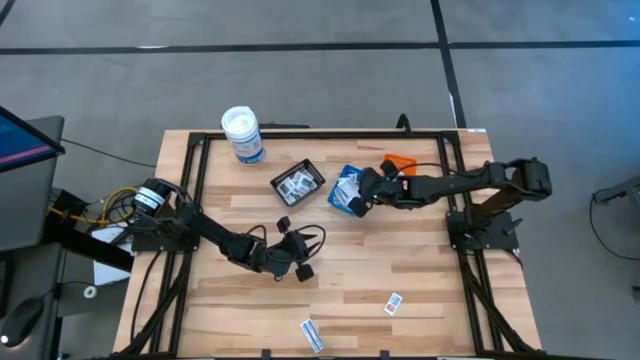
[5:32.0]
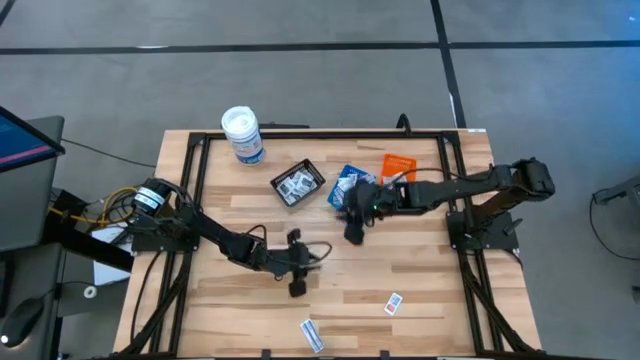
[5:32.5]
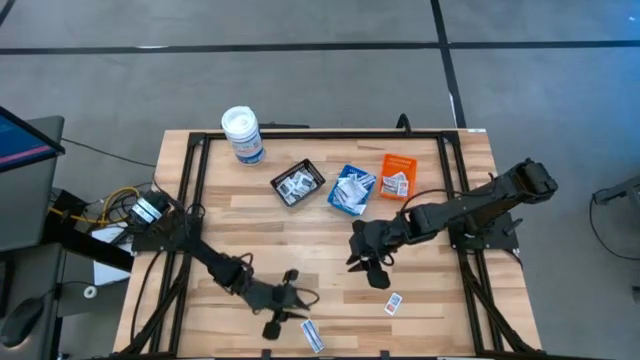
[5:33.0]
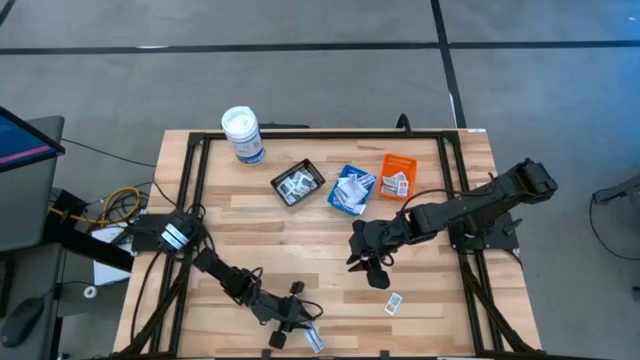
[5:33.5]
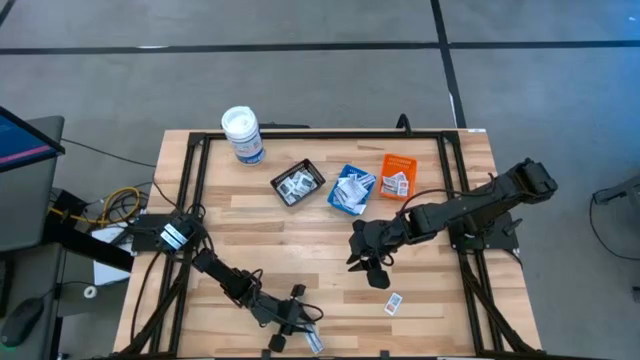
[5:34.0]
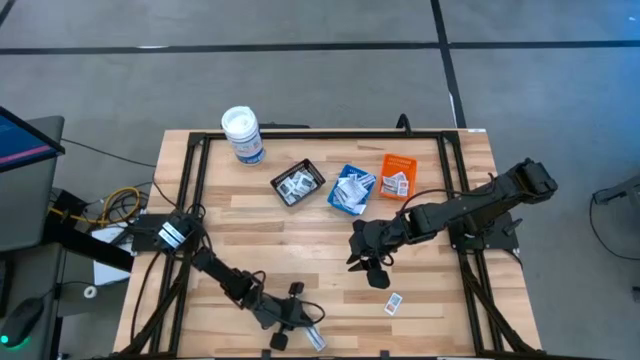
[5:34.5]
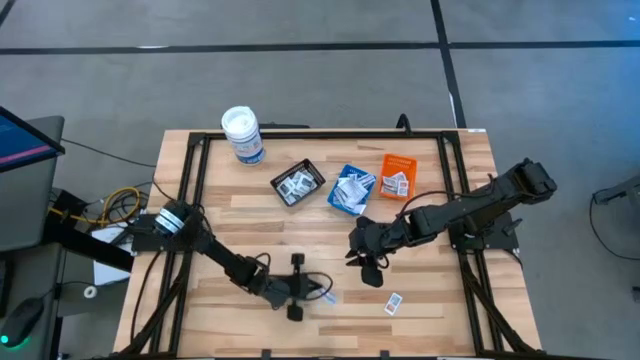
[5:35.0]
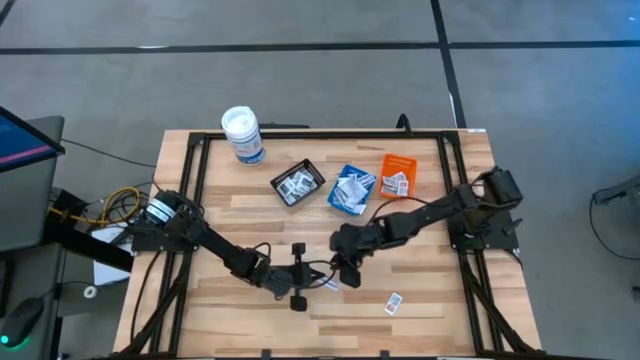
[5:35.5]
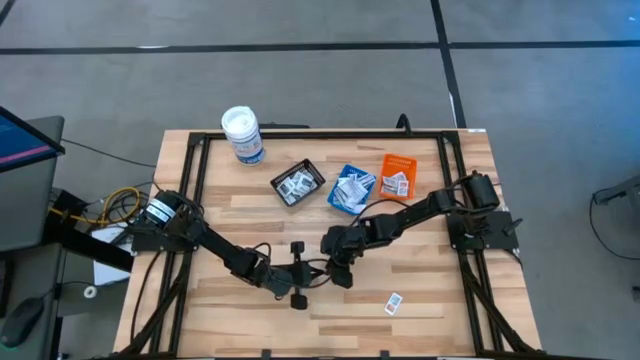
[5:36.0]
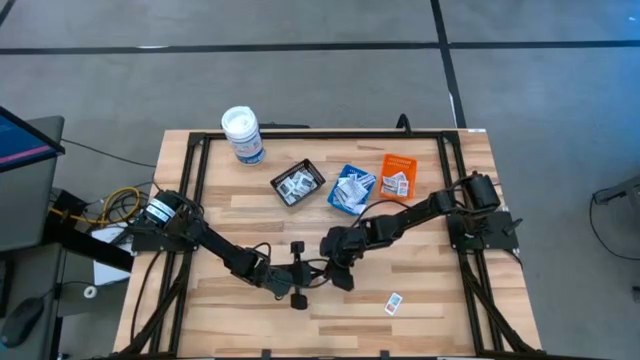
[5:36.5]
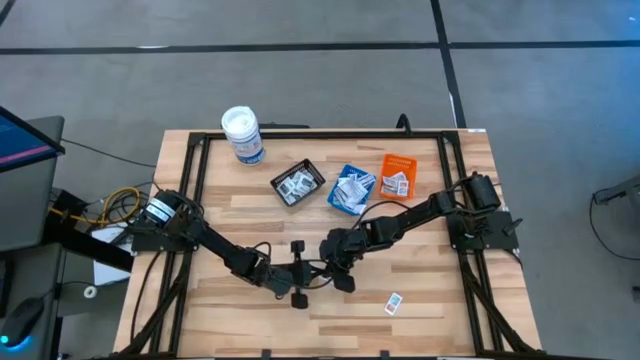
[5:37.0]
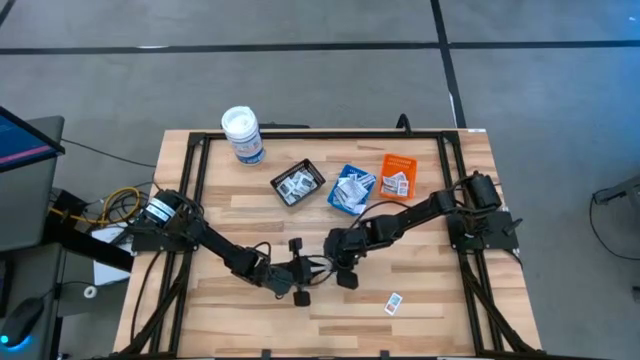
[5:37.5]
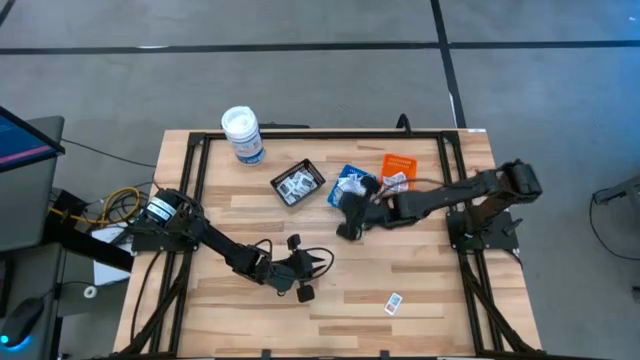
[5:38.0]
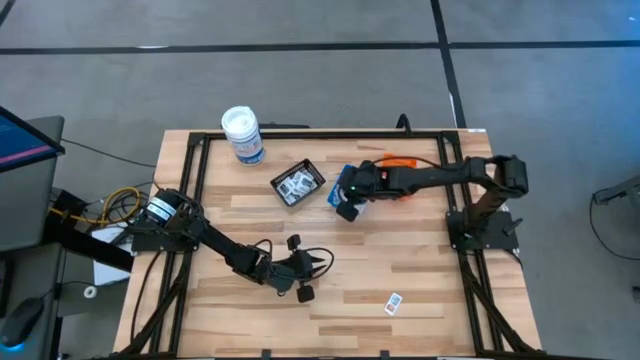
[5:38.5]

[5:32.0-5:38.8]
Task: Pick & Place First Aid Supplies
Put the blue bandage into the blue bin

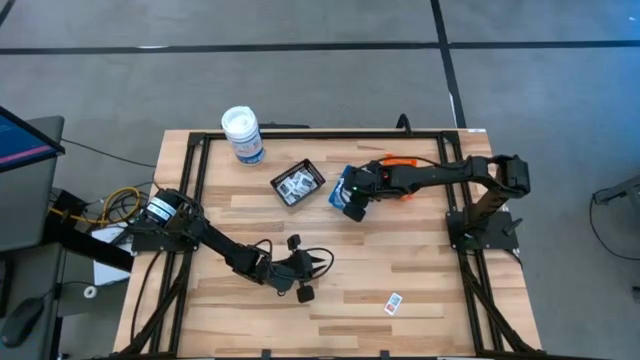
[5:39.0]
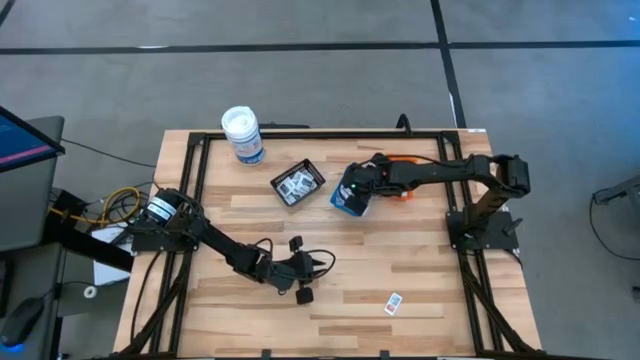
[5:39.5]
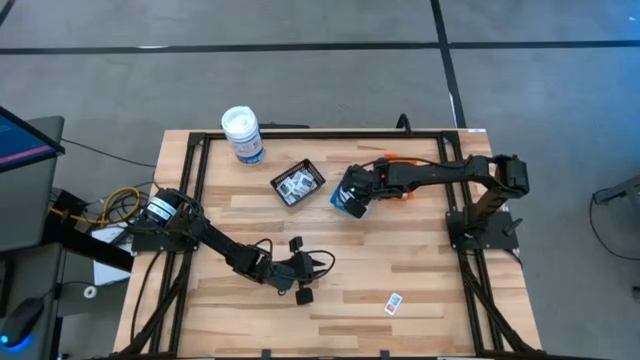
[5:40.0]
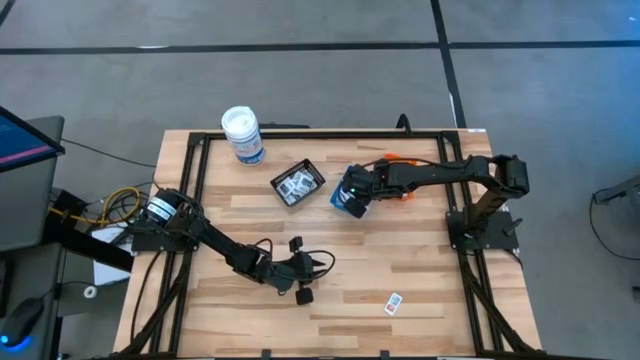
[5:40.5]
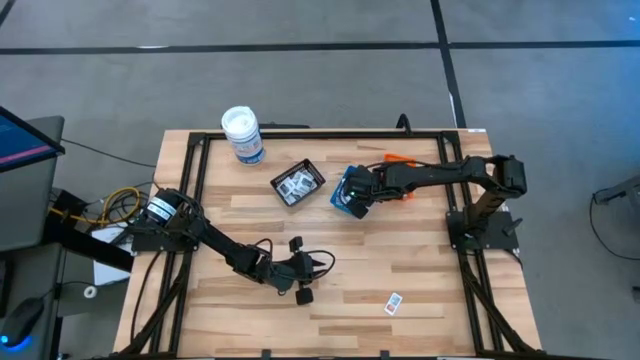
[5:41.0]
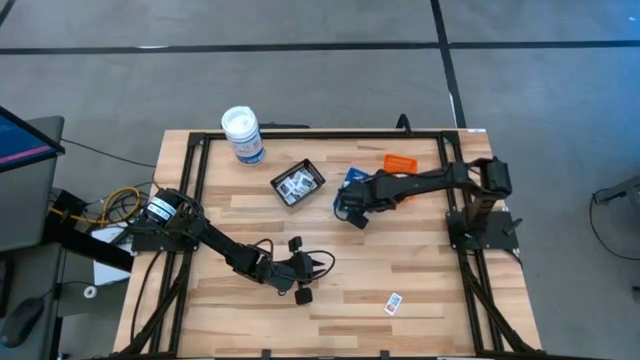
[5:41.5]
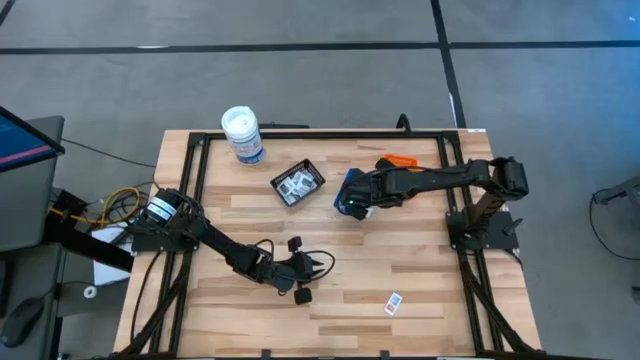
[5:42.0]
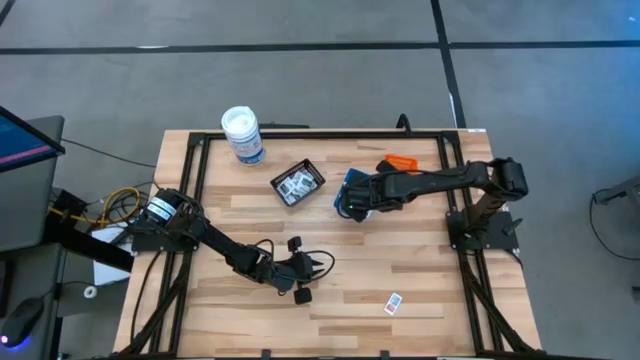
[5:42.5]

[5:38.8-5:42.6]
Adjust the blue bandages in the blue bin

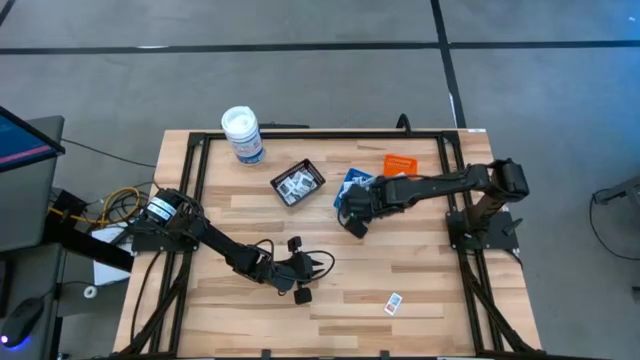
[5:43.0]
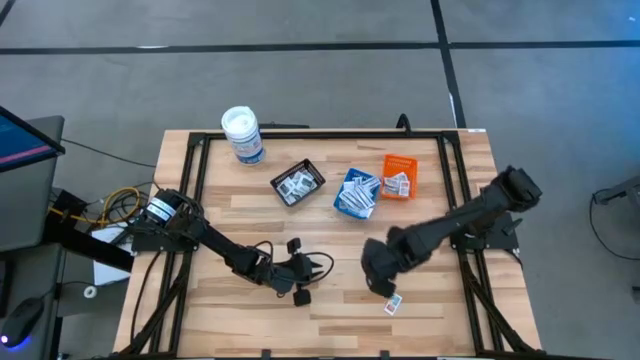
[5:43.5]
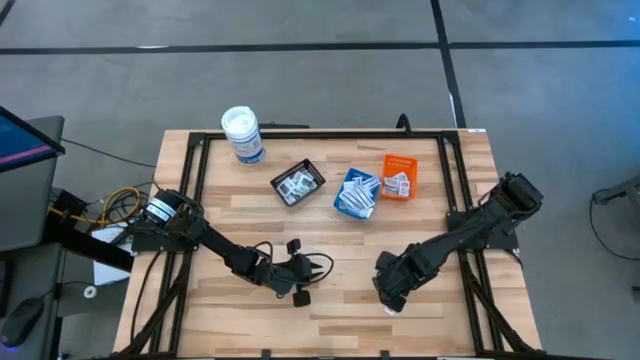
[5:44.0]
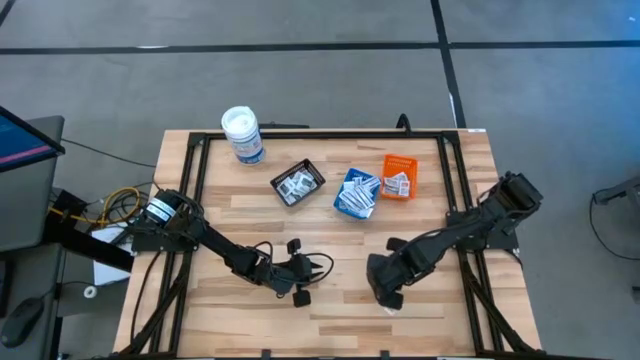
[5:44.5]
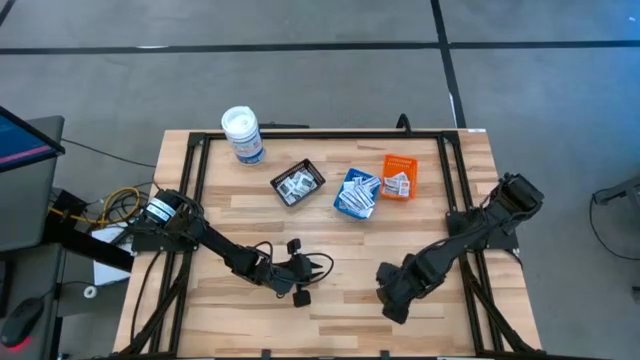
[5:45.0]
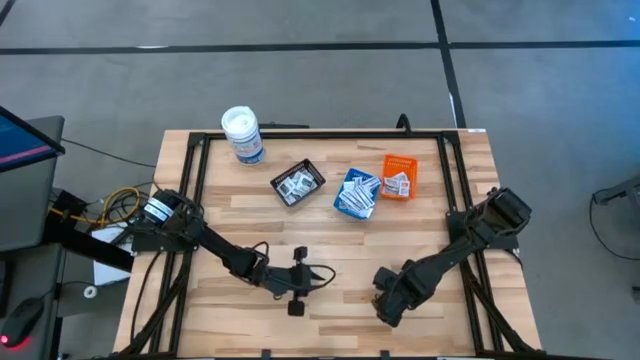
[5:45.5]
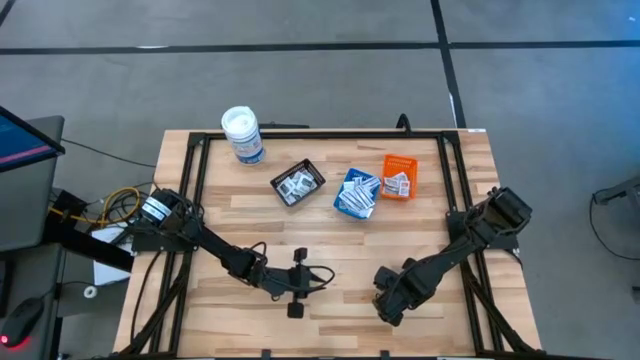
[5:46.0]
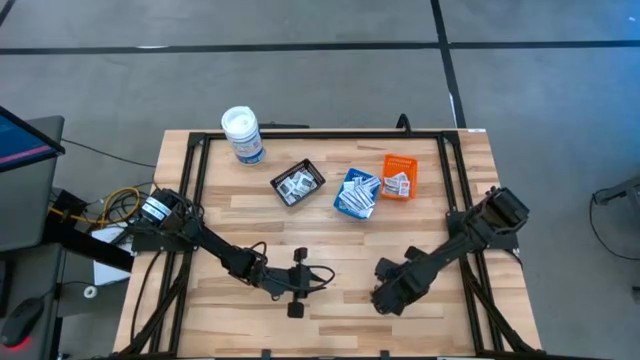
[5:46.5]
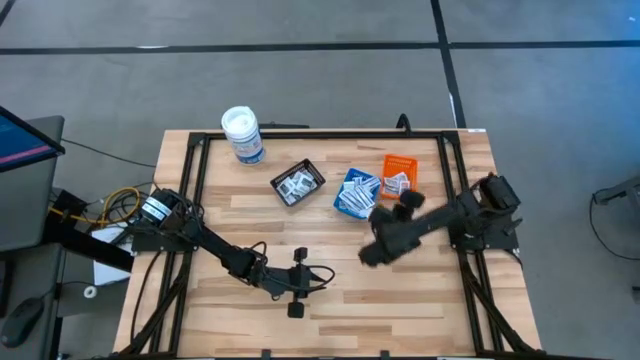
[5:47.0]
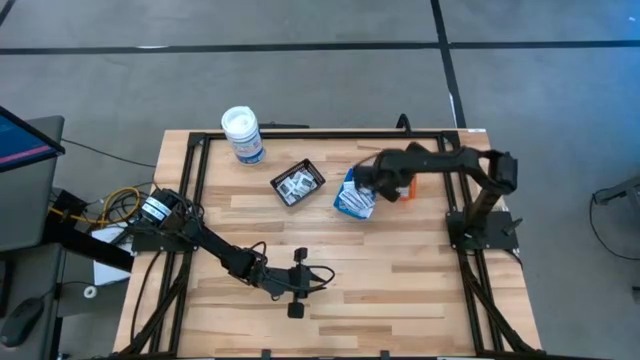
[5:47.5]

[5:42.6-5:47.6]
Put the orange ointment pack into the orange bin

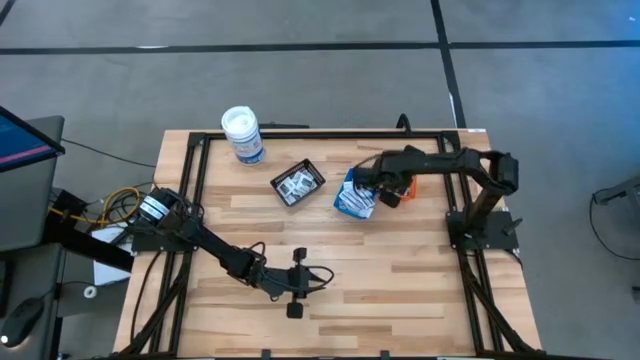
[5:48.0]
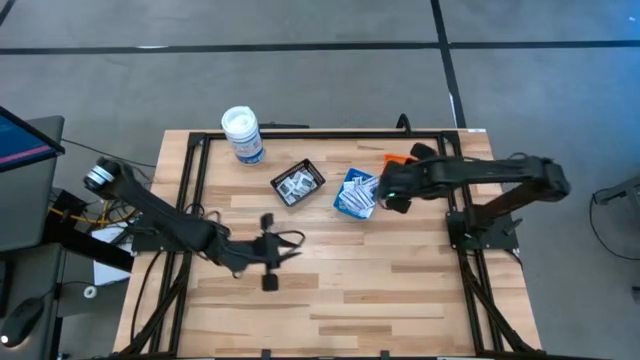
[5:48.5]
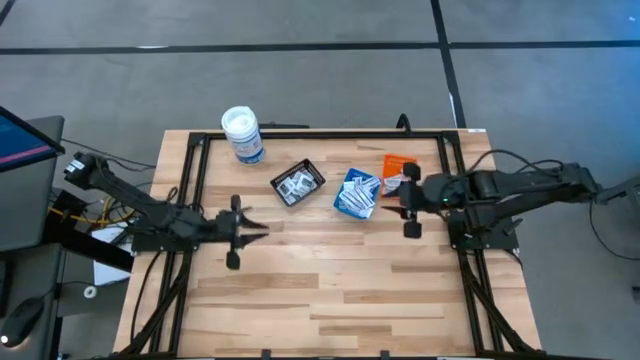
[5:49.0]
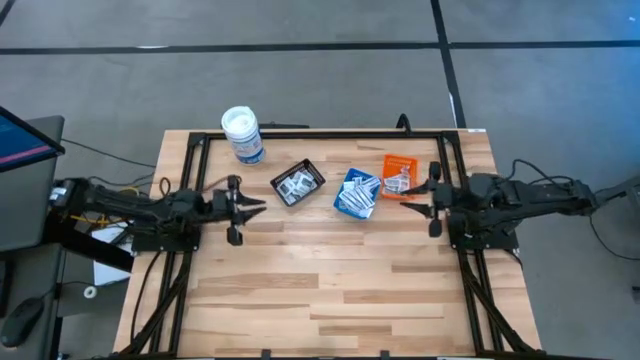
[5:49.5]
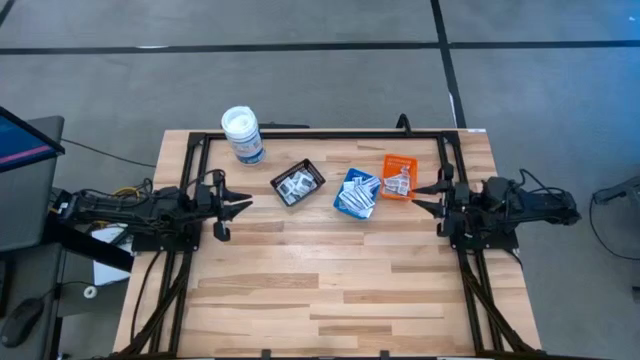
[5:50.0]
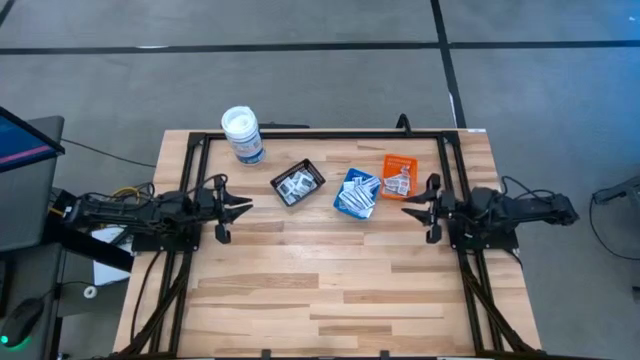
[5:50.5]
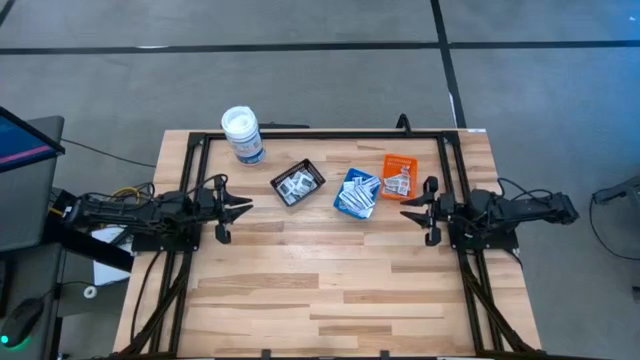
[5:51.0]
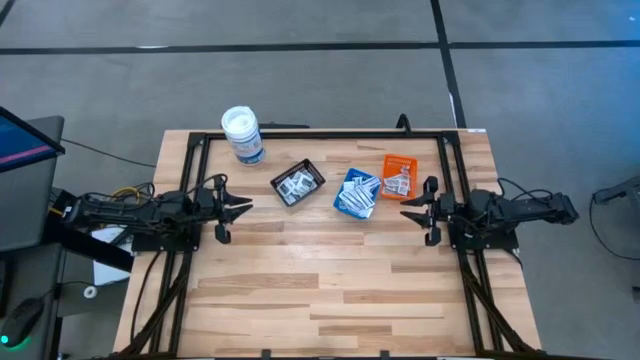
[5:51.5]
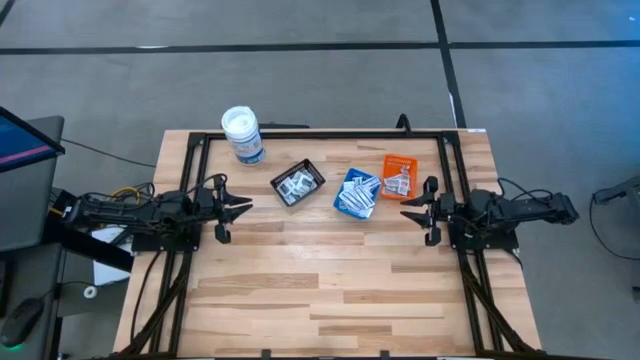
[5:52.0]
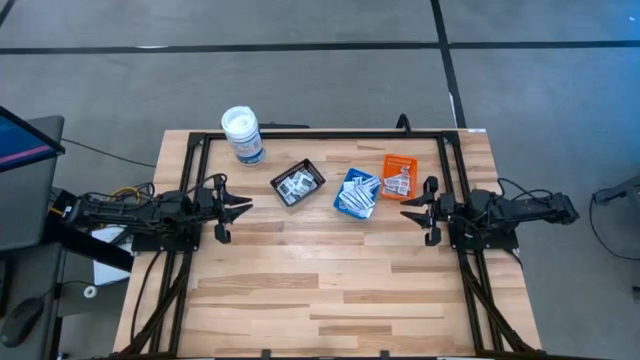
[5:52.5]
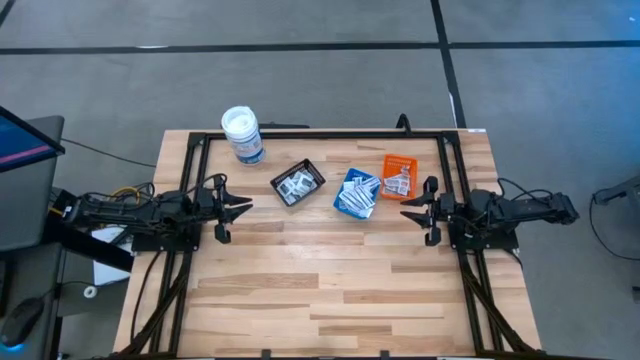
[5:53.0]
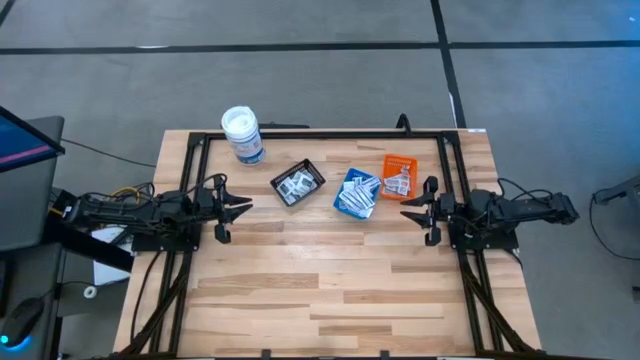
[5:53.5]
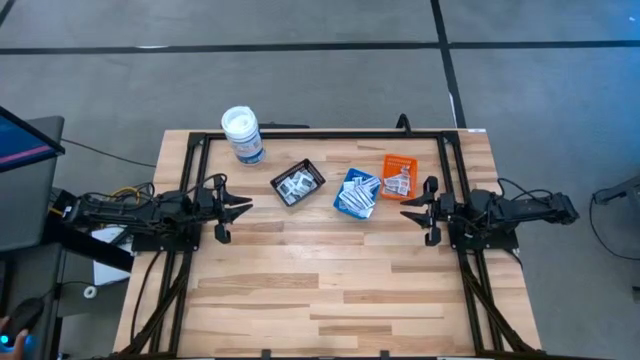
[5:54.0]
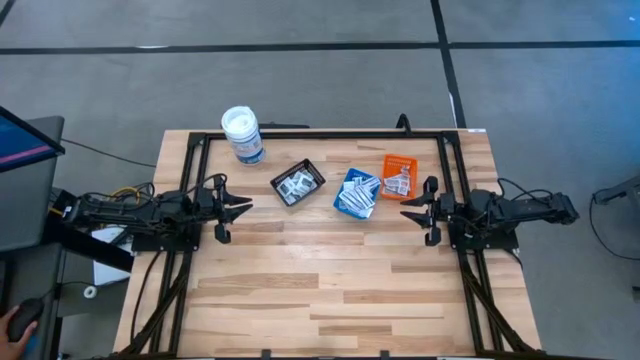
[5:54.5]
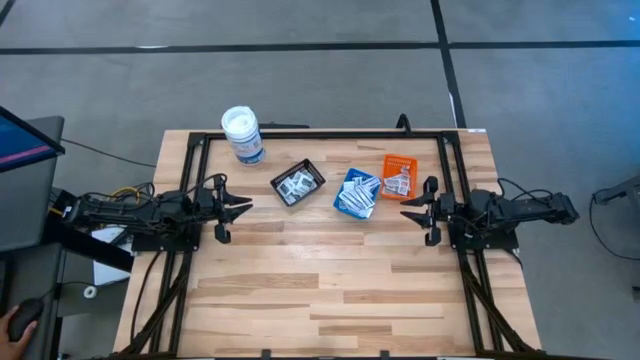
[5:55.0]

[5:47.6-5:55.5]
Return to Home Position
